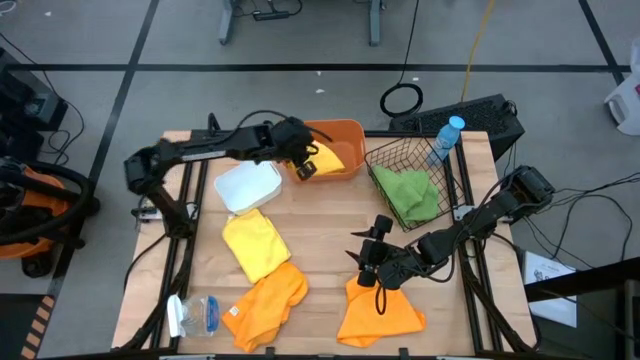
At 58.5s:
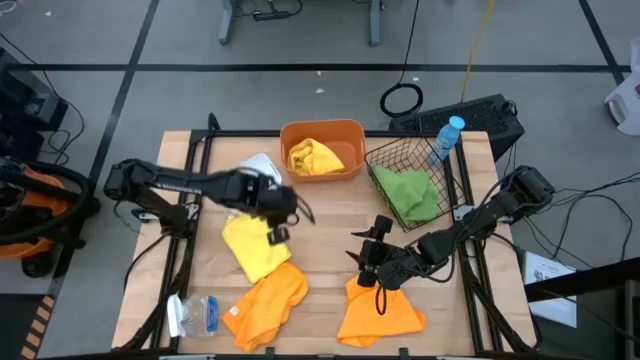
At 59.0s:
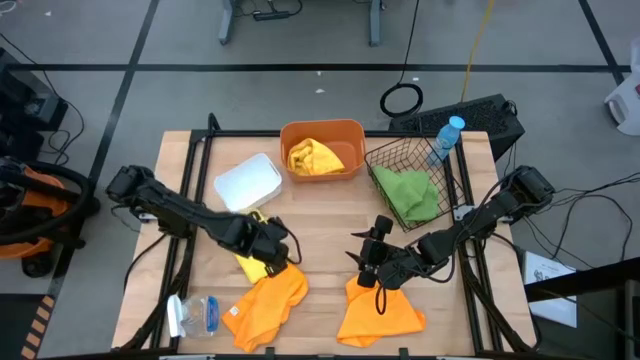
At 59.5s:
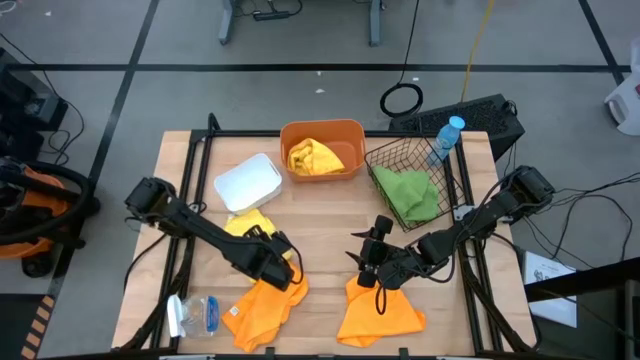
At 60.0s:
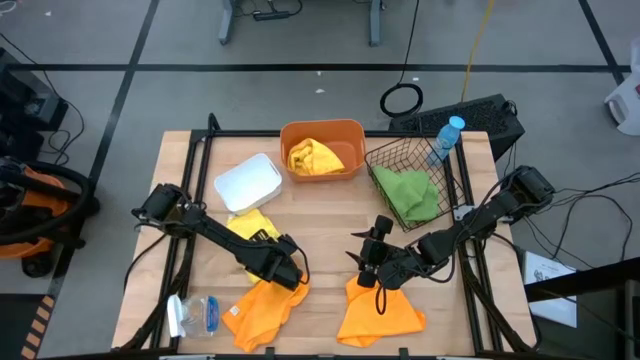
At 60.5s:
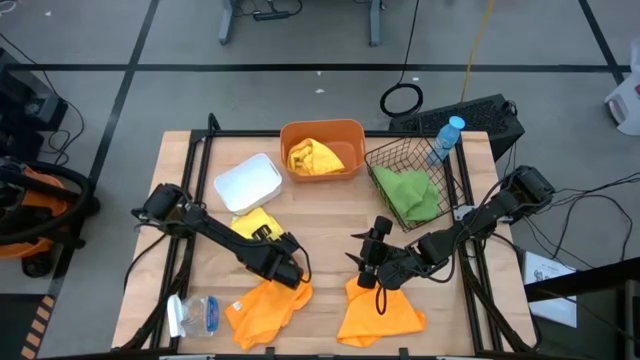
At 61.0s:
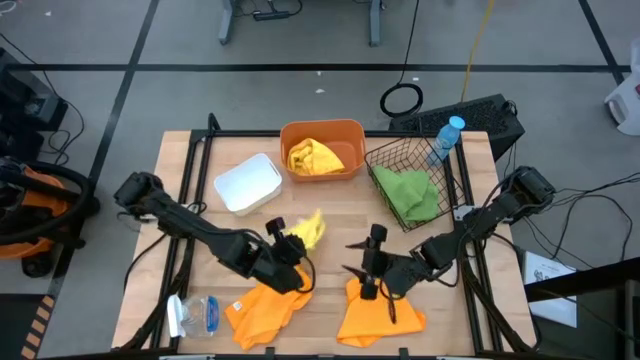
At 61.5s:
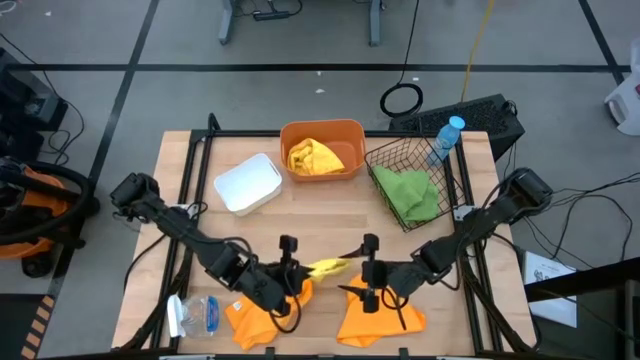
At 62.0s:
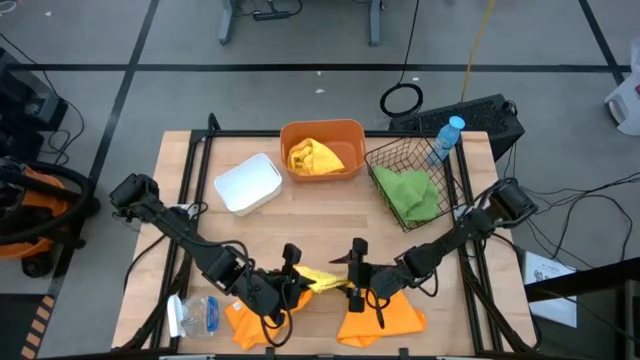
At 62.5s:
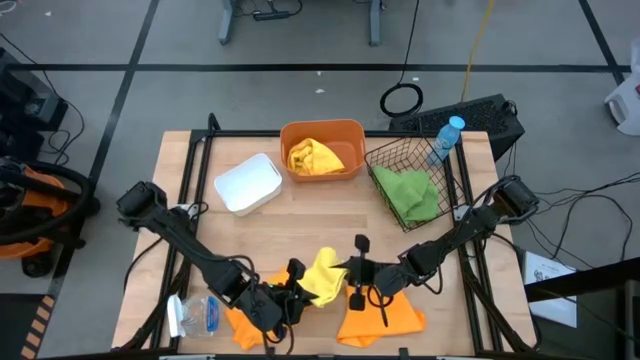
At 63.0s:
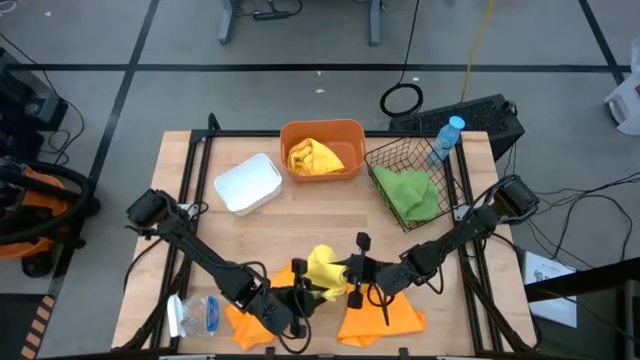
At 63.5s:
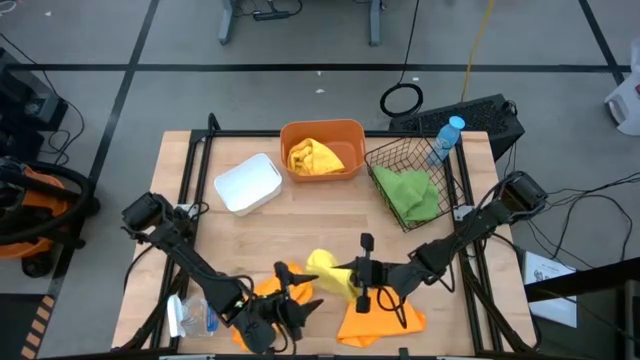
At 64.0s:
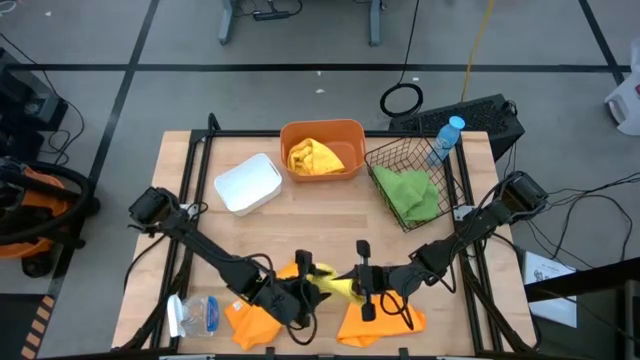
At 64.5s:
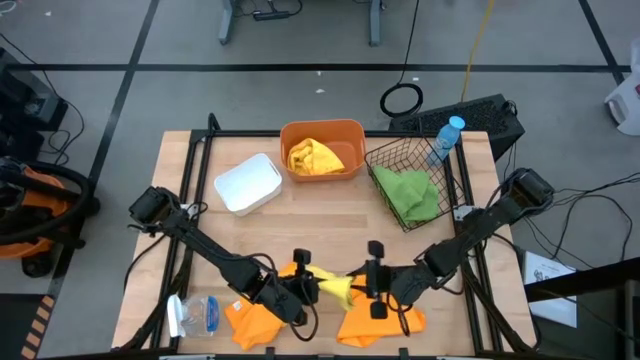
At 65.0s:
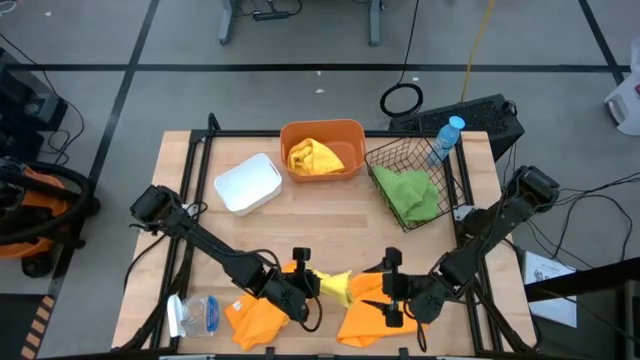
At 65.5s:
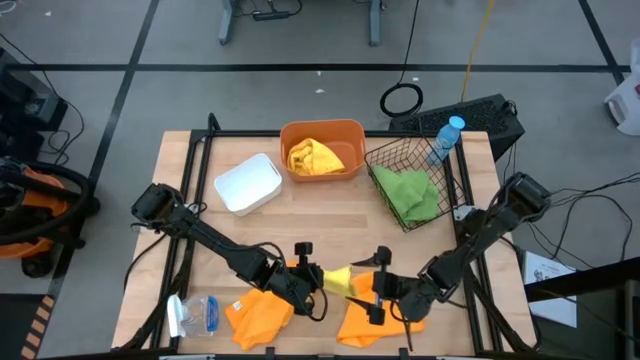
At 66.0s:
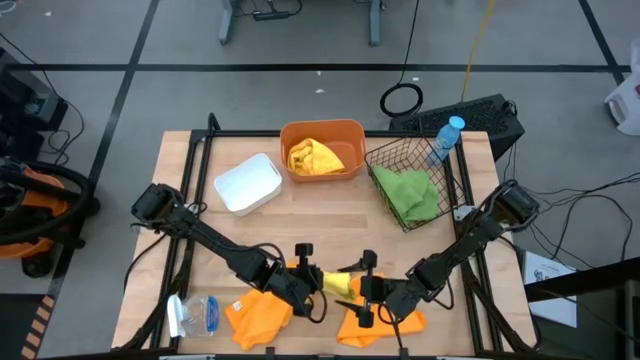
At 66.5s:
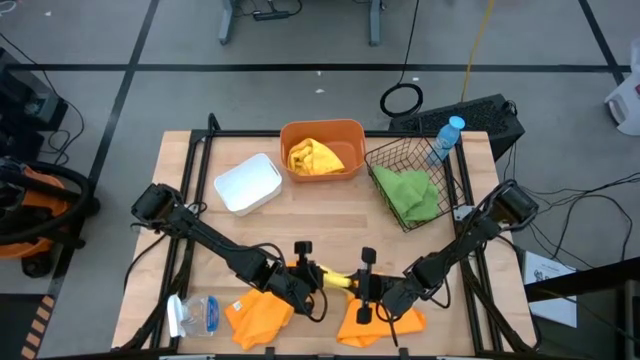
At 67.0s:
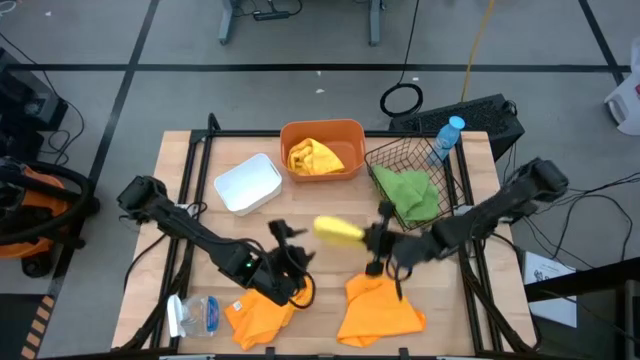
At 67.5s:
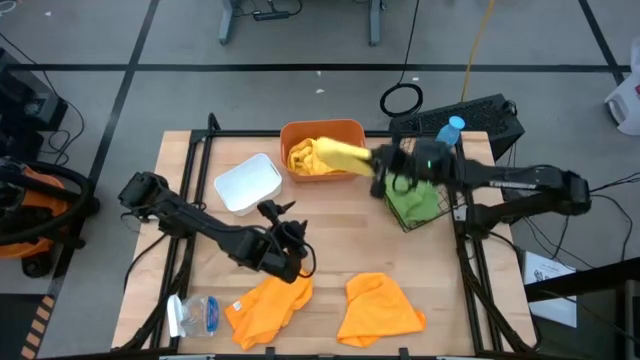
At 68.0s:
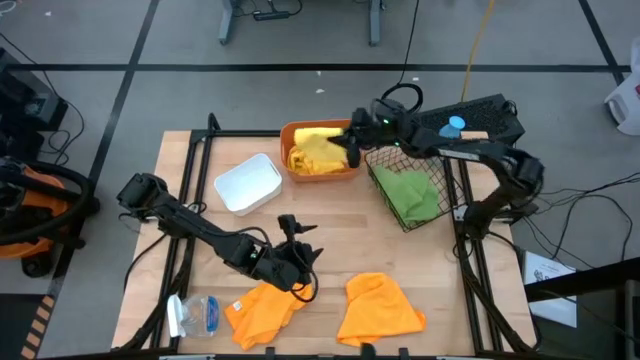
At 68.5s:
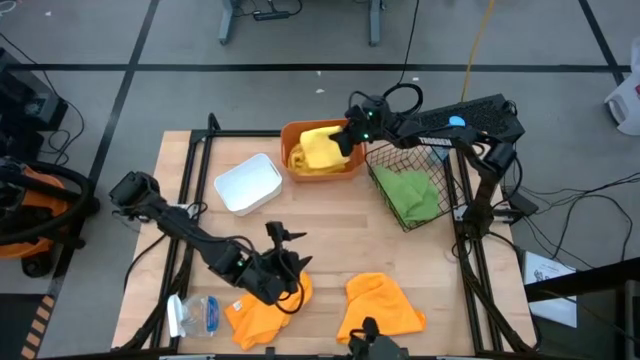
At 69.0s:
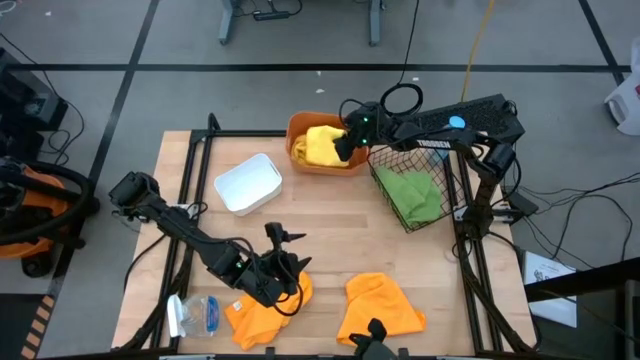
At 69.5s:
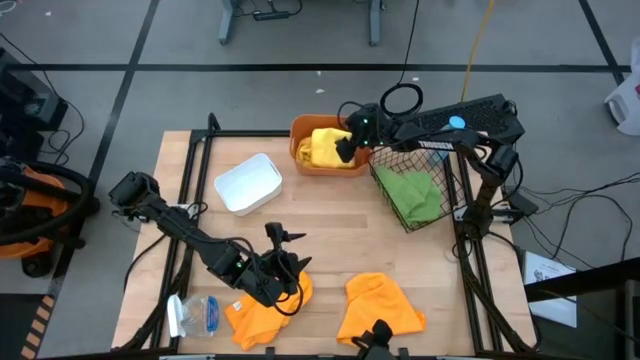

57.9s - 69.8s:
Task: Sort microfiber towel by color & place in baskets
Put the yellow towel into the orange bin

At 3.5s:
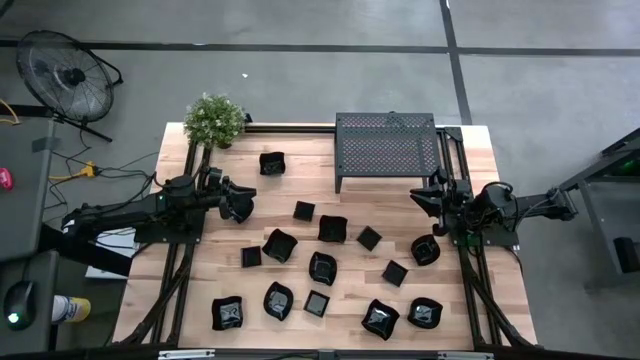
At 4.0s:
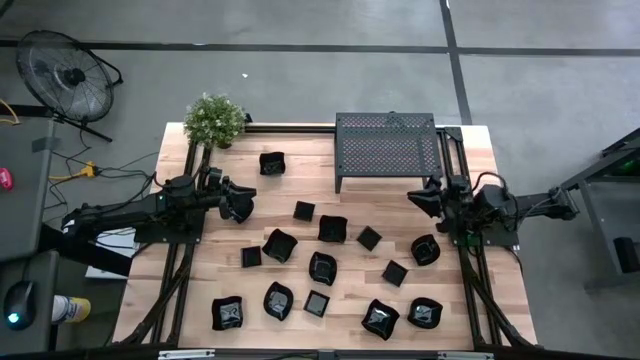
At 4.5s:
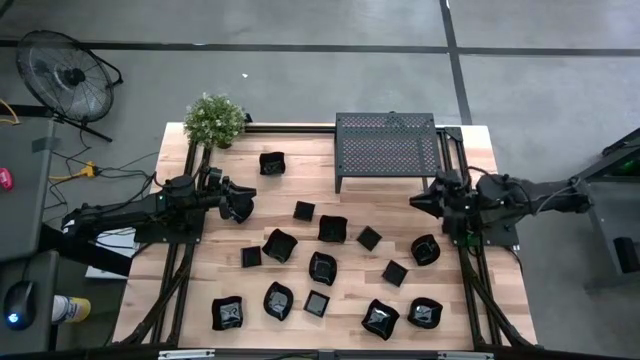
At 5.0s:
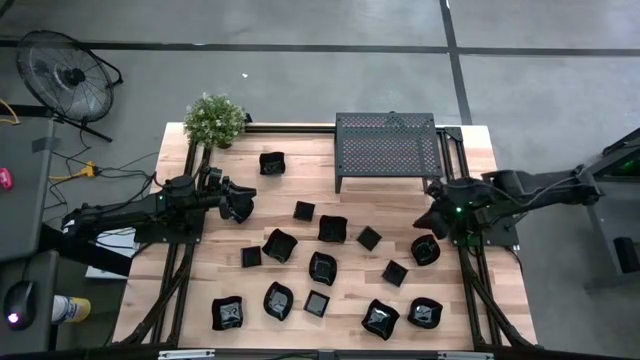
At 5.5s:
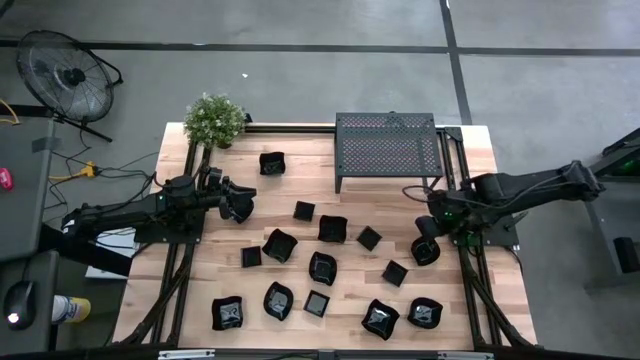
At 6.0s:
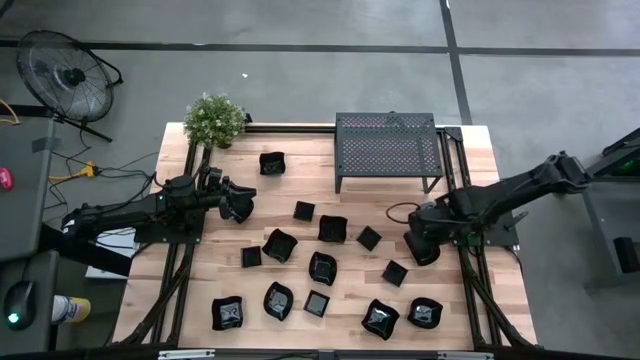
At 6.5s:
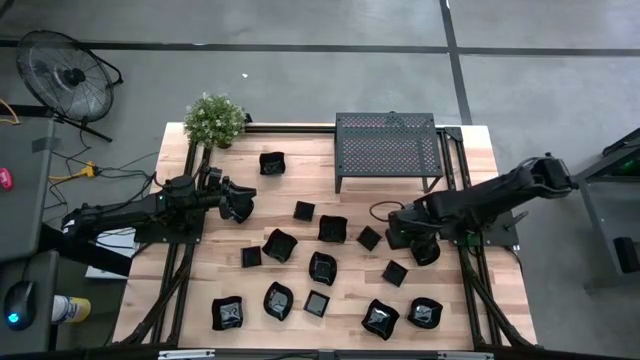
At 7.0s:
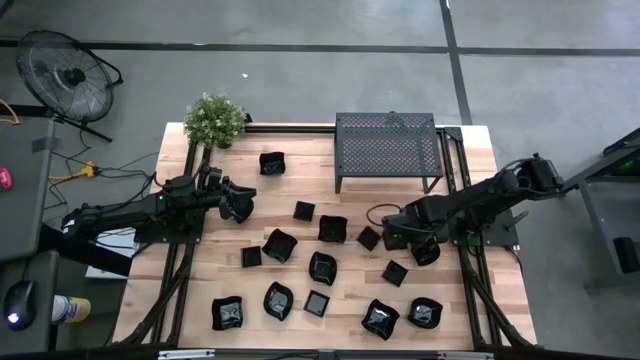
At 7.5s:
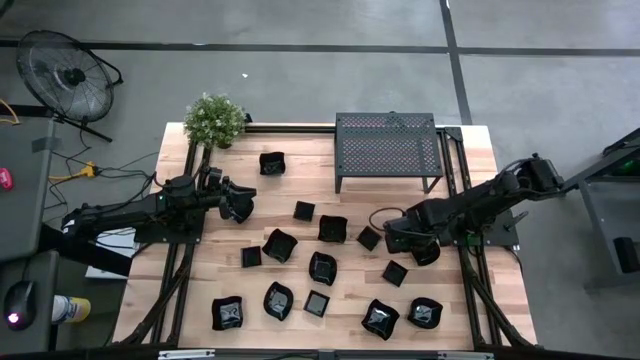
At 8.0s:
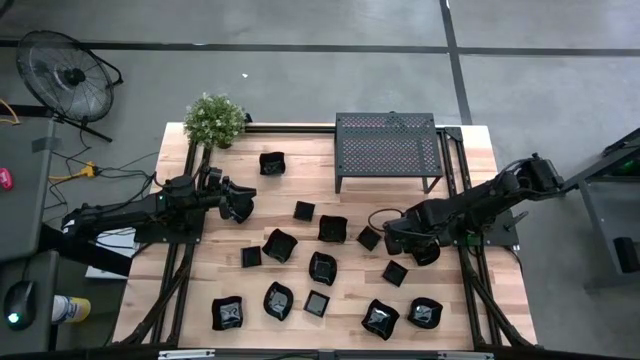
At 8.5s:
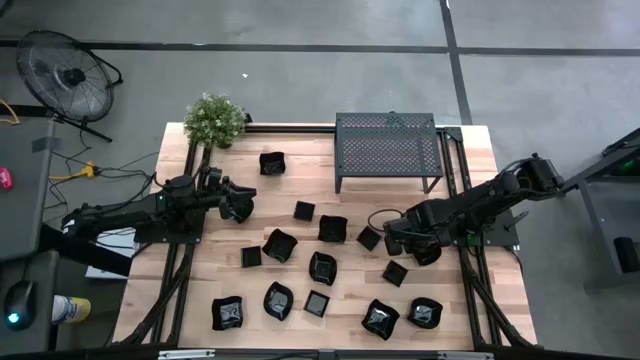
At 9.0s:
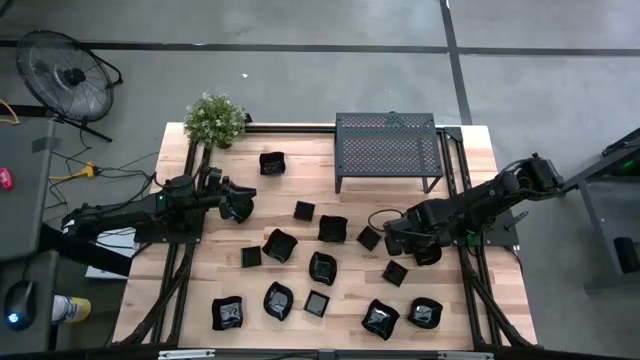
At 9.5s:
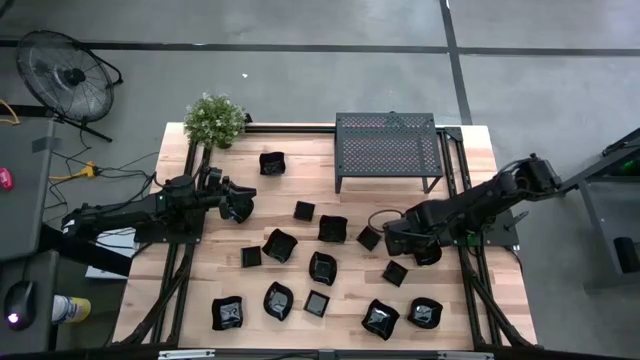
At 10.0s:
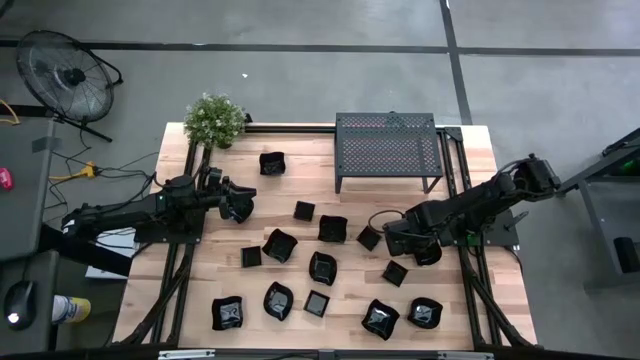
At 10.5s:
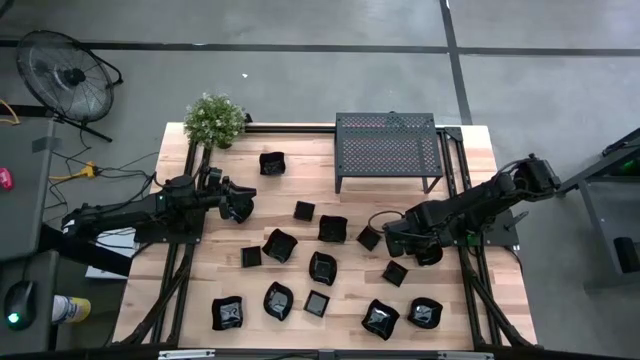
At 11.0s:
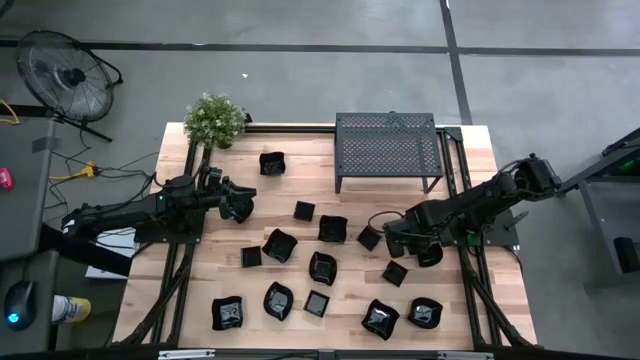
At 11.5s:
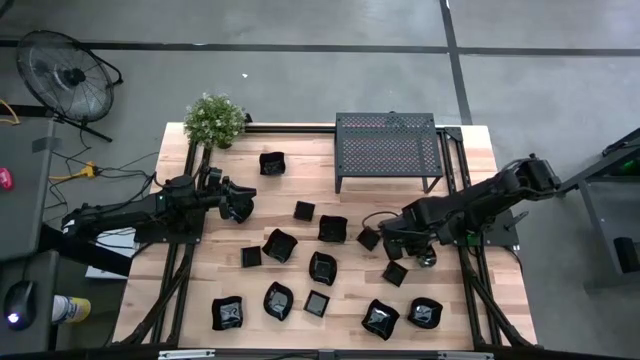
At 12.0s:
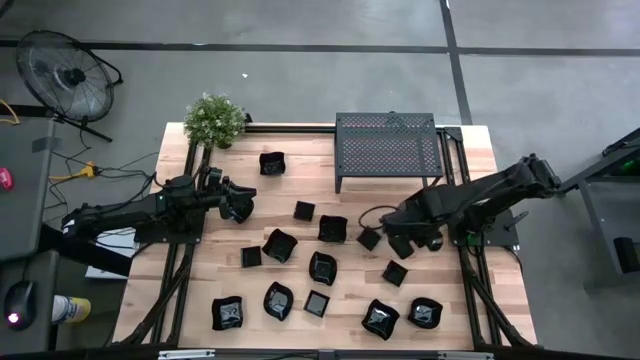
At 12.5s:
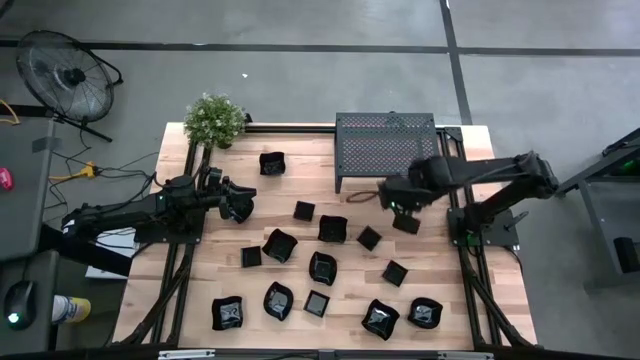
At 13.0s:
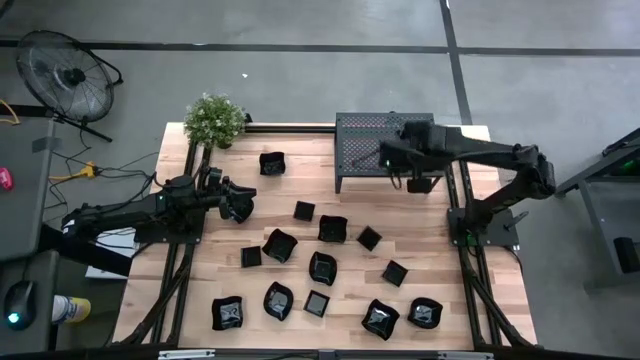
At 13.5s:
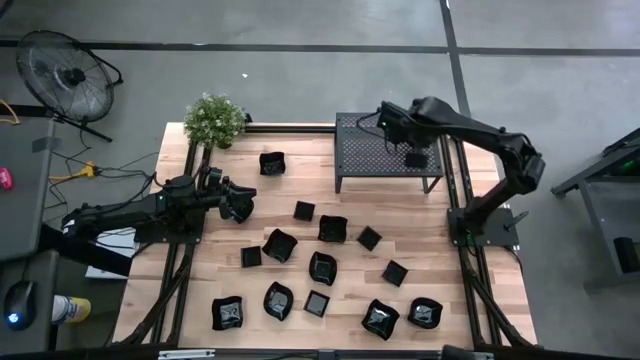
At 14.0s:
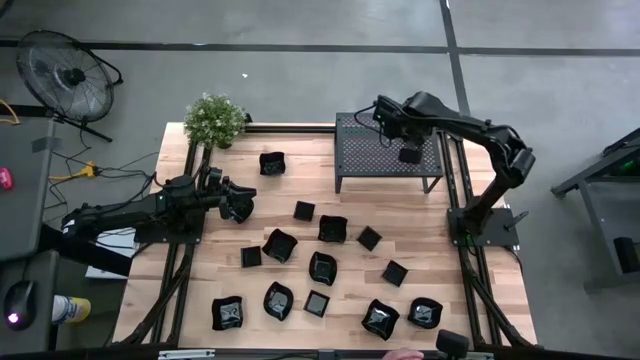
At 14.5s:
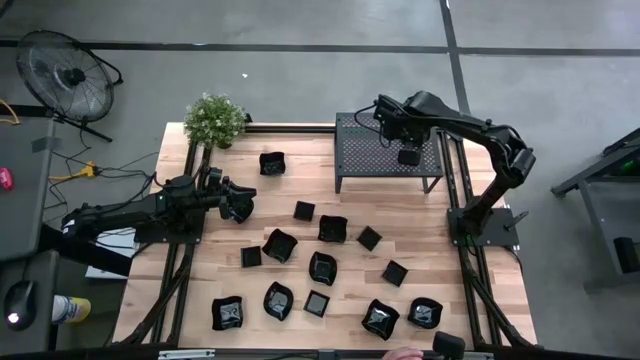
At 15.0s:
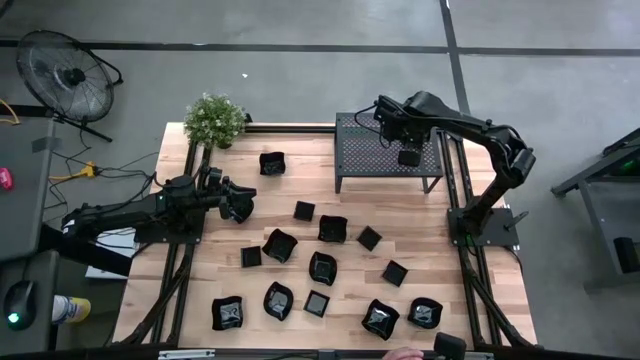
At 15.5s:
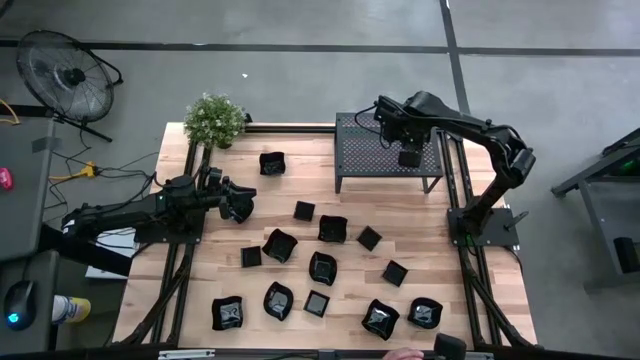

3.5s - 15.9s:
Task: Pick & Place Mini shaped plates
Put the black leaf-shaped plate on the shelf
